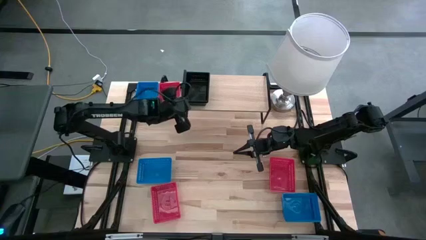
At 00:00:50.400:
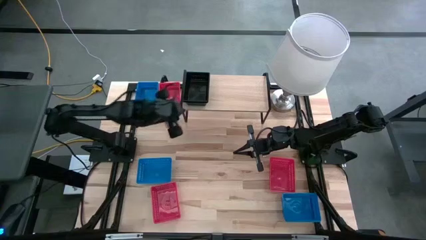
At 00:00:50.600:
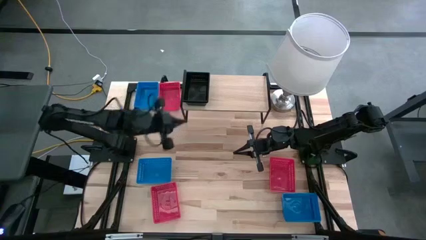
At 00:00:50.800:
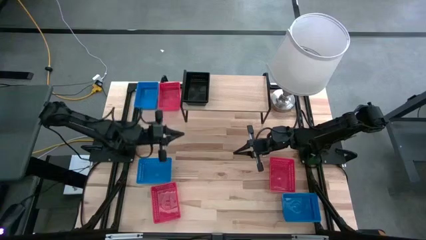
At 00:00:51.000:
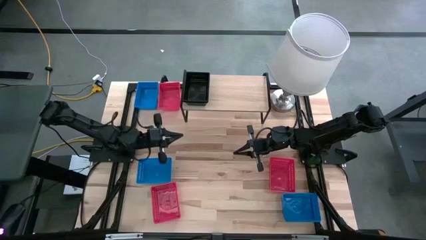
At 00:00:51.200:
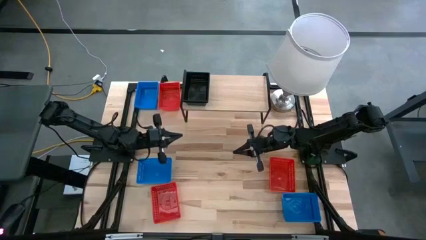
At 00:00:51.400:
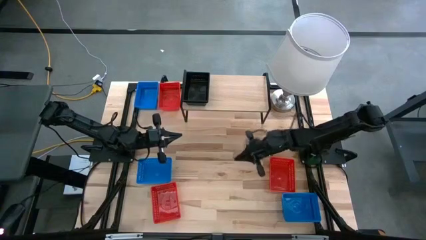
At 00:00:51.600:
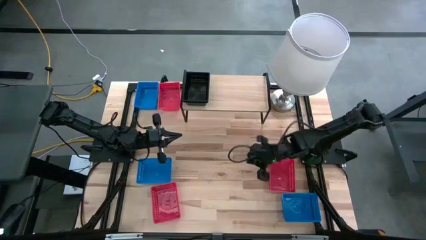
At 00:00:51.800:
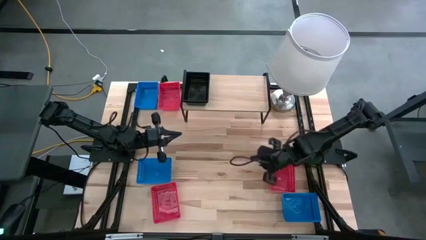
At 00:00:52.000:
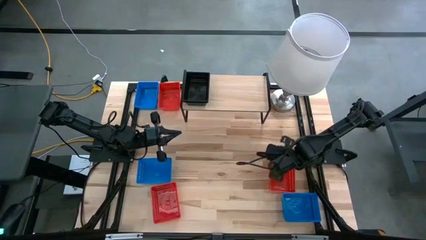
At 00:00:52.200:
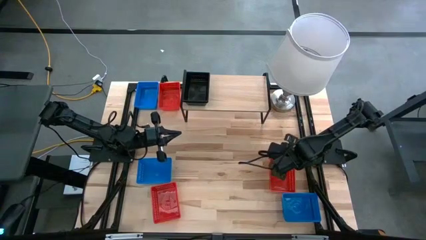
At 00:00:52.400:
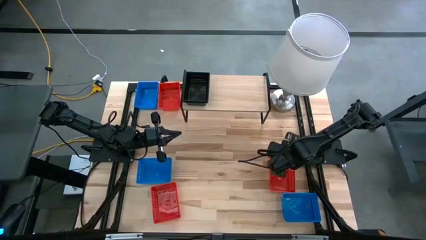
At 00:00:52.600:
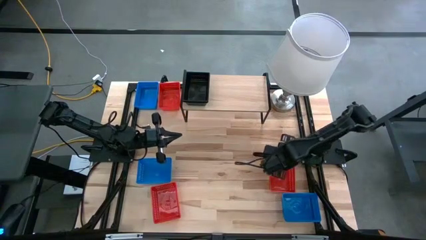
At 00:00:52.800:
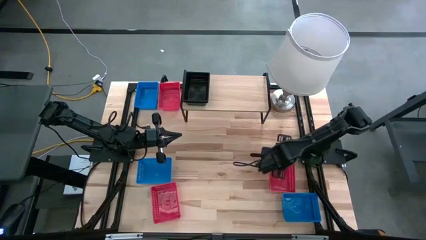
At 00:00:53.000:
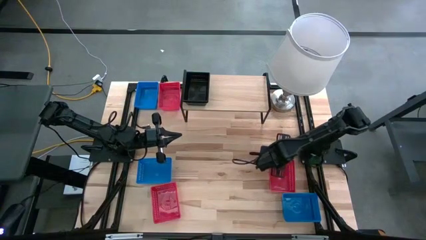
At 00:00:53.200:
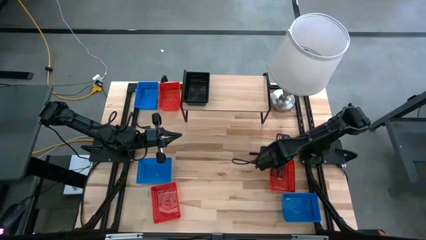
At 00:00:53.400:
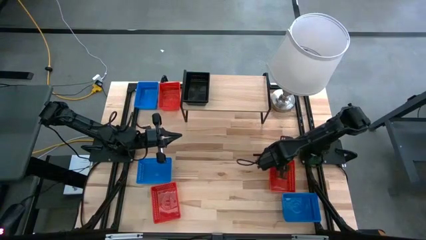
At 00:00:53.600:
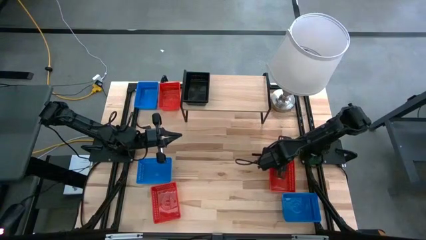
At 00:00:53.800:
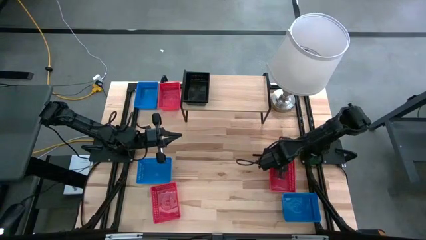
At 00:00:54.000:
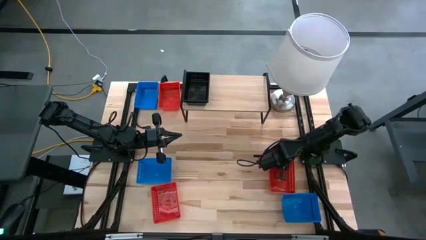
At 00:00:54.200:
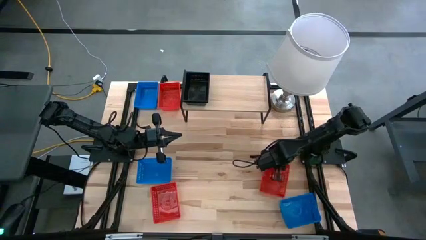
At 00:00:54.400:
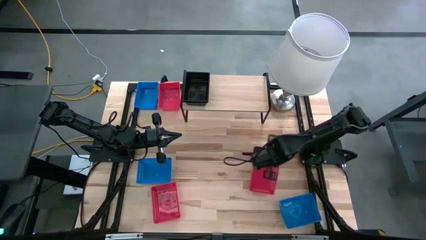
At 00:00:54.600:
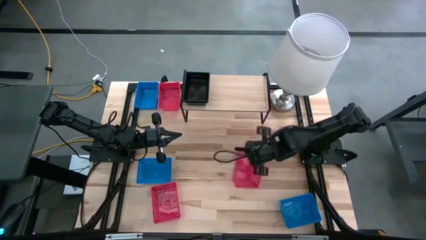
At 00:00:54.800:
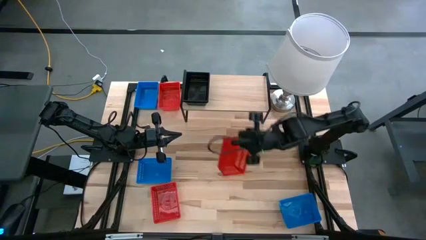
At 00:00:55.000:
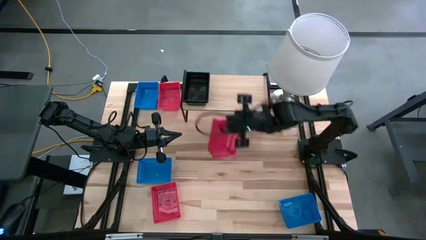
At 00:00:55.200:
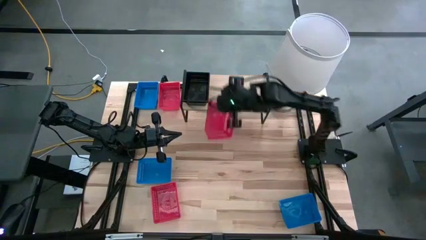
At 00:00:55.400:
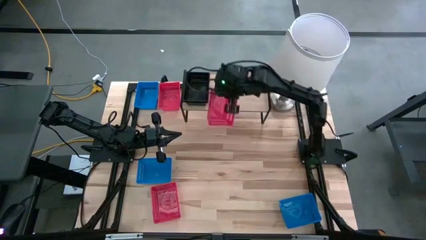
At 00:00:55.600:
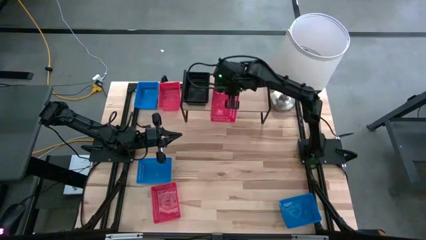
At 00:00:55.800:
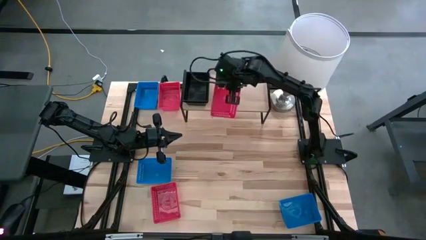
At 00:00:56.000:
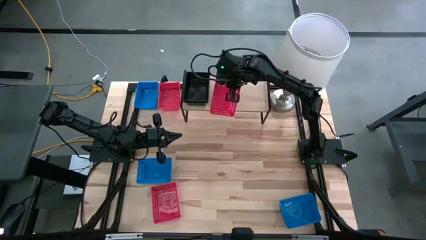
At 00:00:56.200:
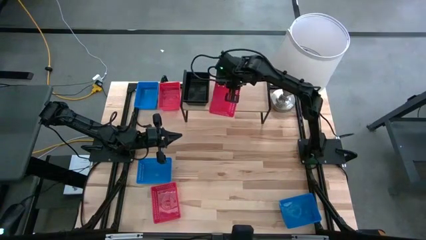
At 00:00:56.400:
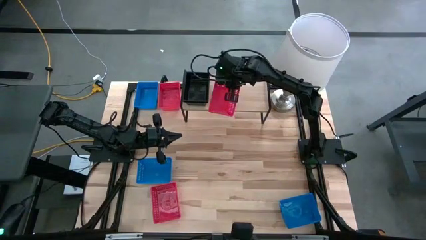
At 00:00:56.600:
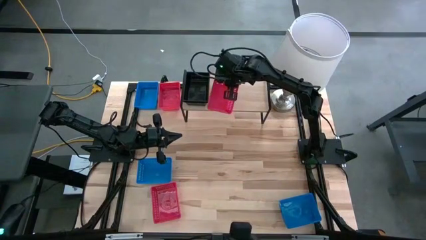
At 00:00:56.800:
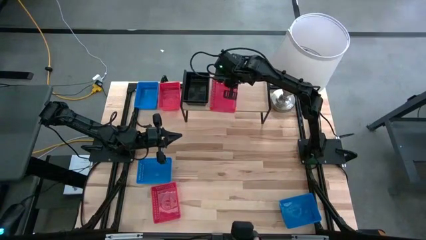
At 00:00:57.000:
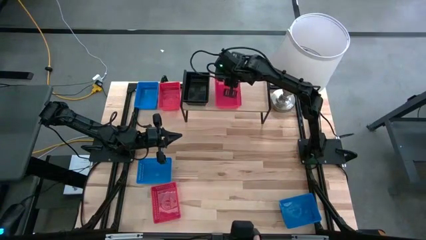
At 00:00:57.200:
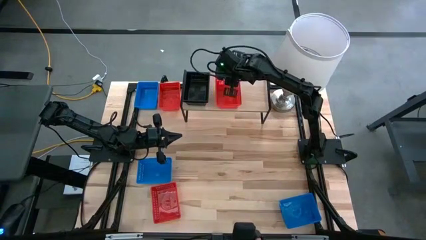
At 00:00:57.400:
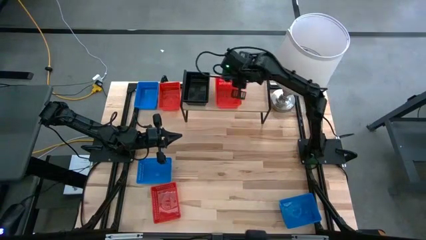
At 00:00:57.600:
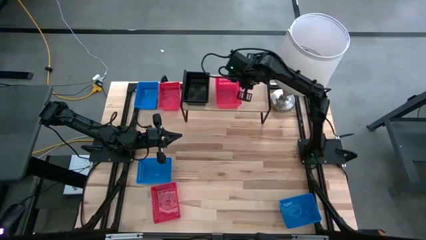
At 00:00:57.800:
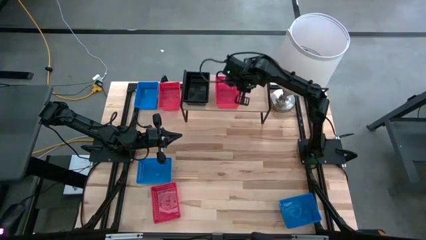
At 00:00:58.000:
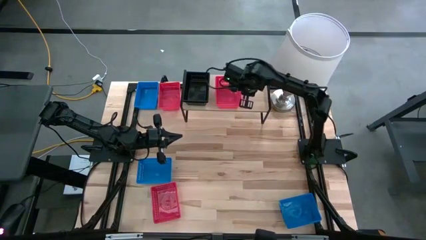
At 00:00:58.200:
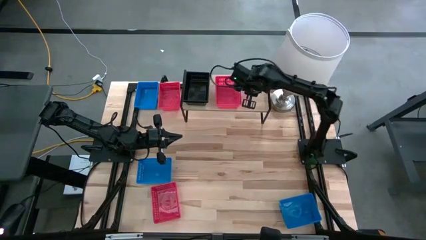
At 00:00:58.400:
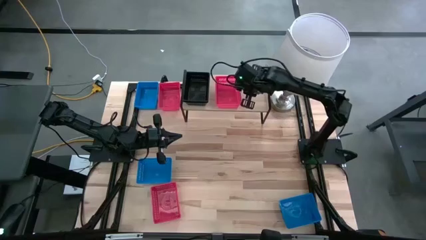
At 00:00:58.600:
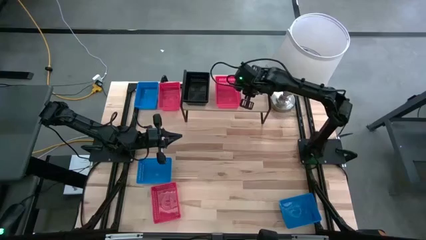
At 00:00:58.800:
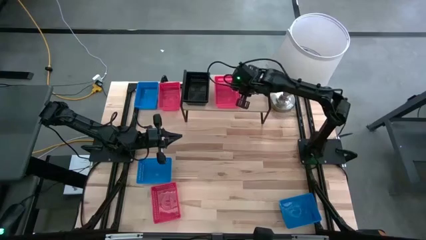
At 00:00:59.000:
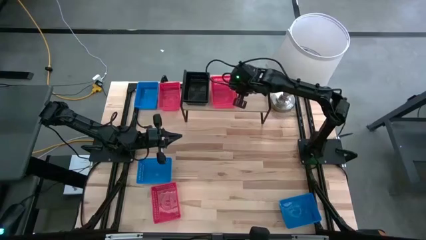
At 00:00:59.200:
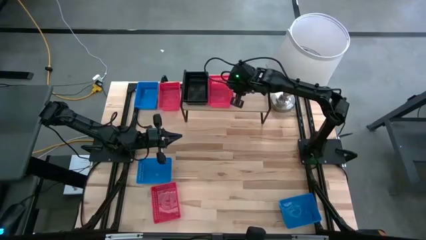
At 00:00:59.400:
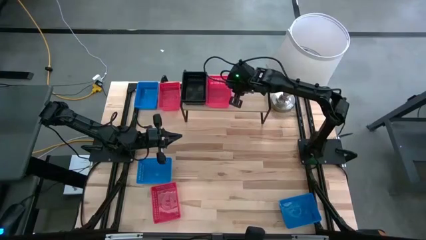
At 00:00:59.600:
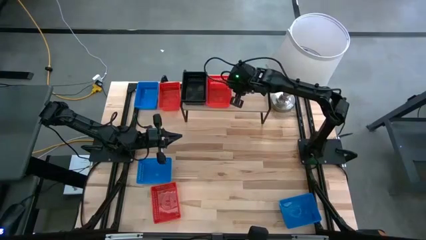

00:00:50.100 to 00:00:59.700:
Task: Stack baskets on shelf by color
Put the bottom right red bin on the shelf
